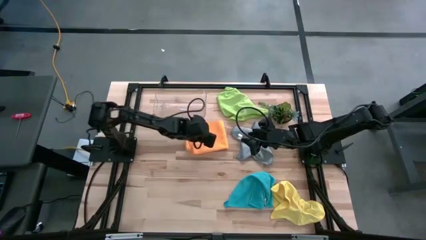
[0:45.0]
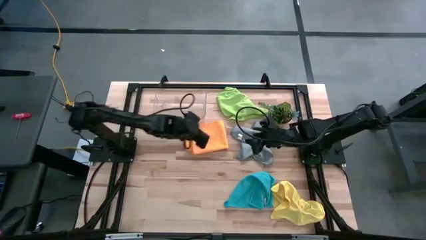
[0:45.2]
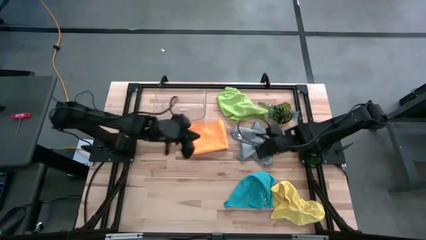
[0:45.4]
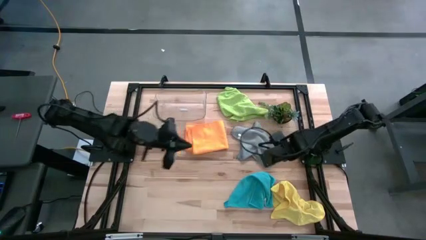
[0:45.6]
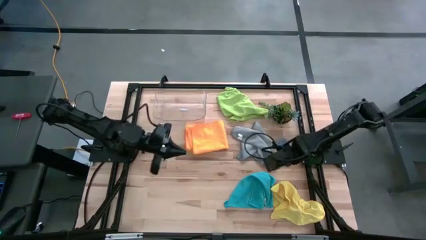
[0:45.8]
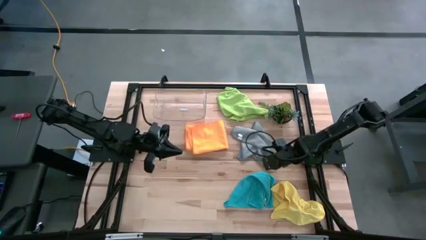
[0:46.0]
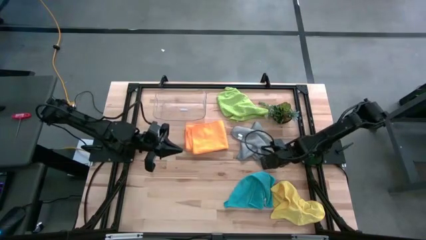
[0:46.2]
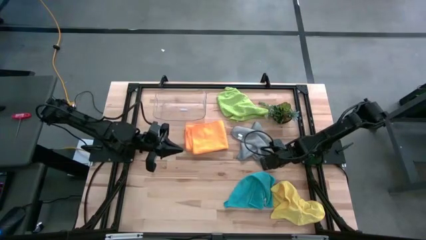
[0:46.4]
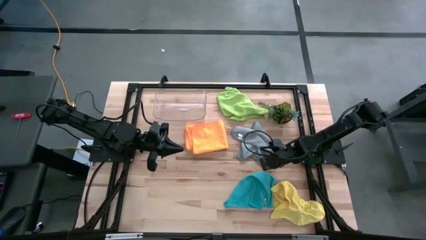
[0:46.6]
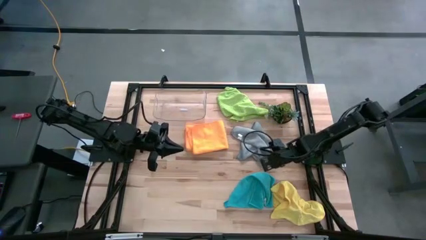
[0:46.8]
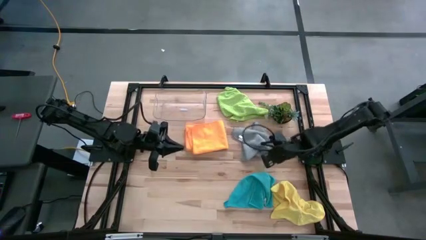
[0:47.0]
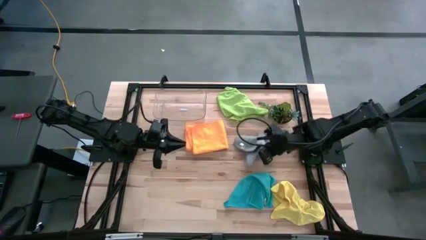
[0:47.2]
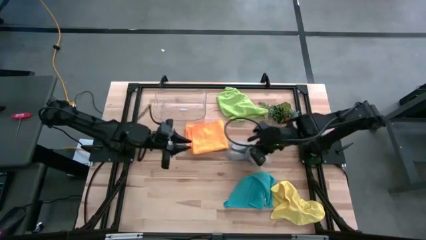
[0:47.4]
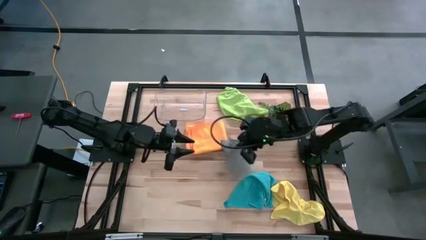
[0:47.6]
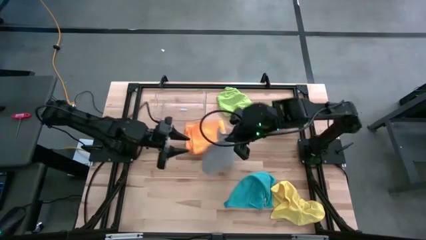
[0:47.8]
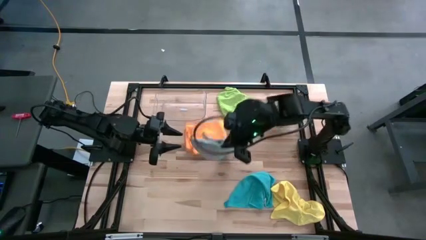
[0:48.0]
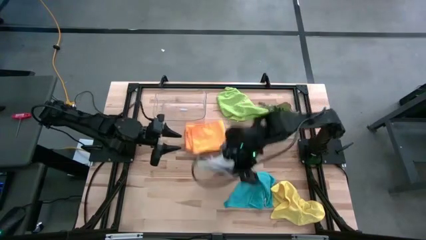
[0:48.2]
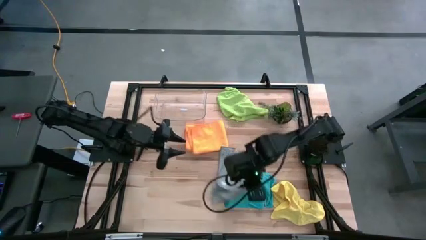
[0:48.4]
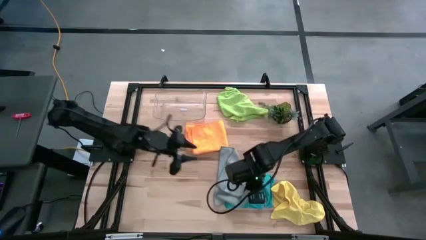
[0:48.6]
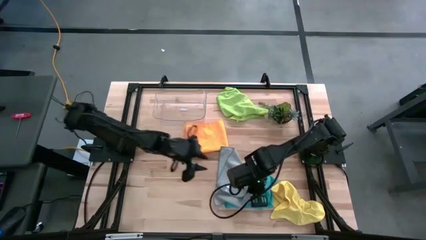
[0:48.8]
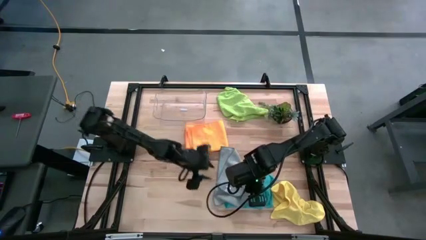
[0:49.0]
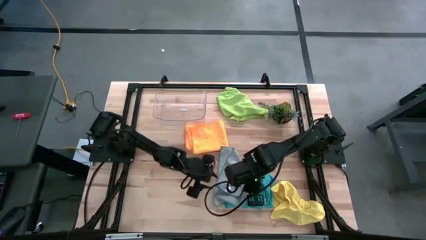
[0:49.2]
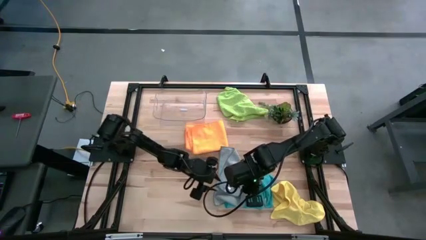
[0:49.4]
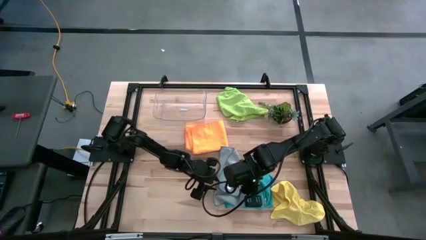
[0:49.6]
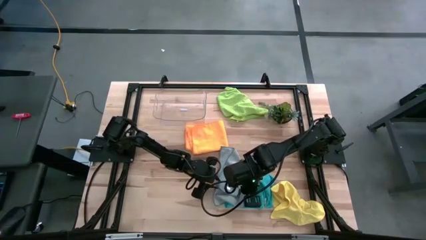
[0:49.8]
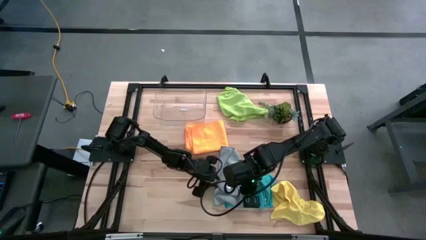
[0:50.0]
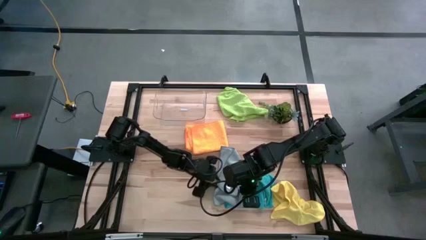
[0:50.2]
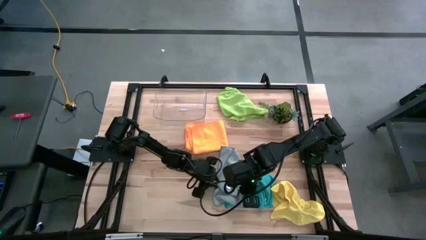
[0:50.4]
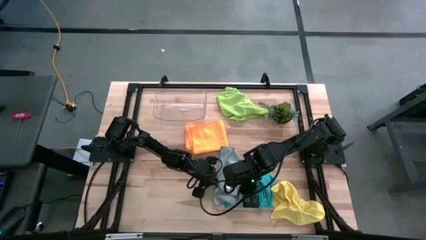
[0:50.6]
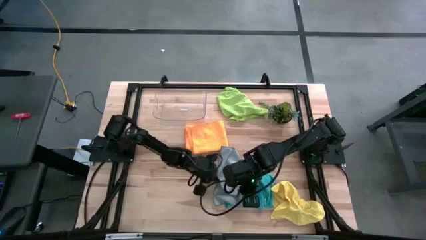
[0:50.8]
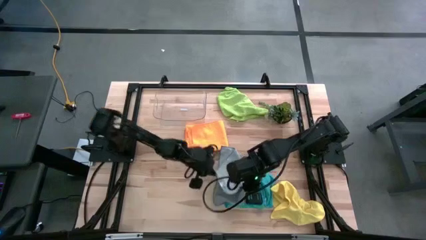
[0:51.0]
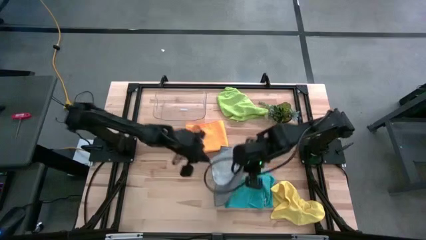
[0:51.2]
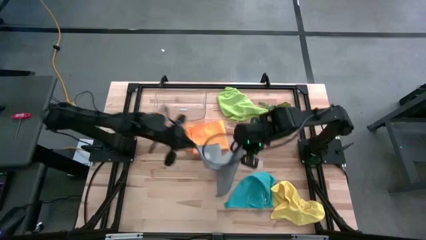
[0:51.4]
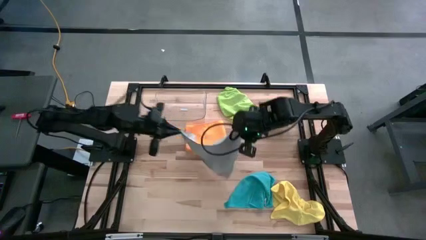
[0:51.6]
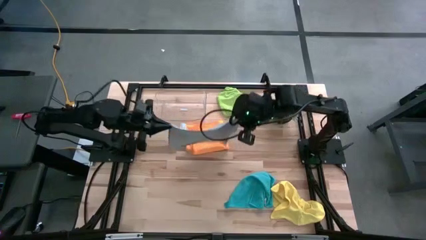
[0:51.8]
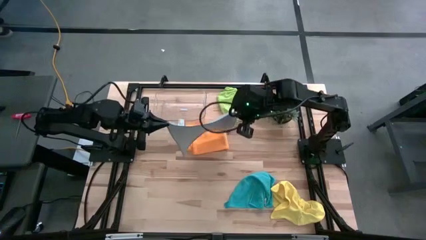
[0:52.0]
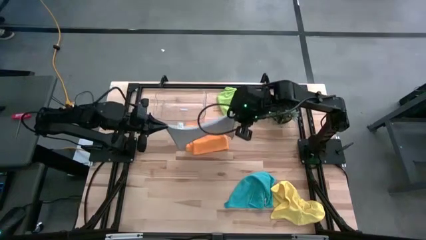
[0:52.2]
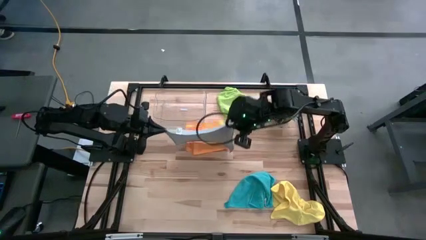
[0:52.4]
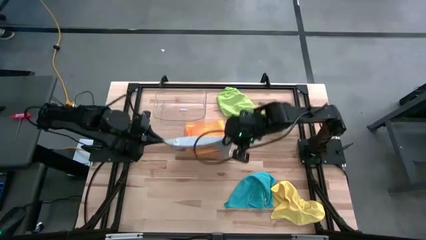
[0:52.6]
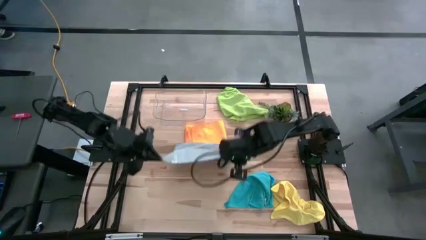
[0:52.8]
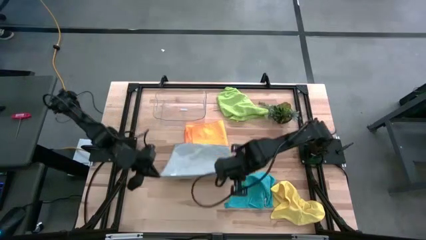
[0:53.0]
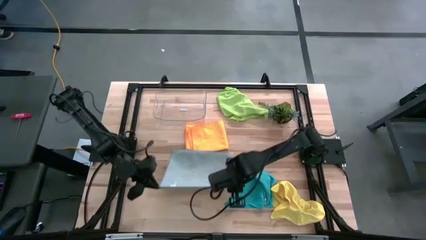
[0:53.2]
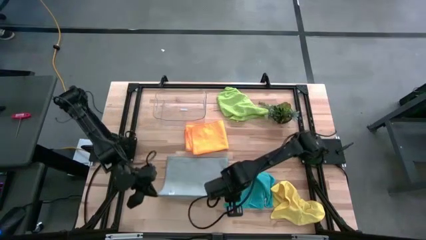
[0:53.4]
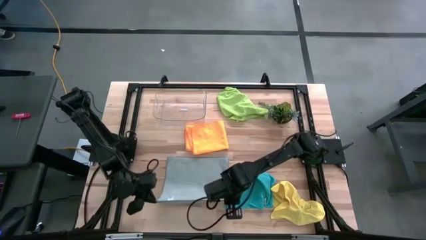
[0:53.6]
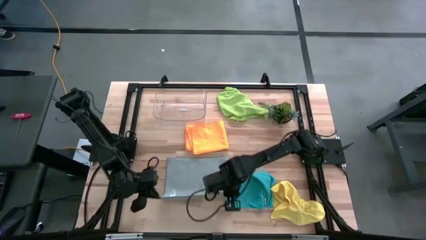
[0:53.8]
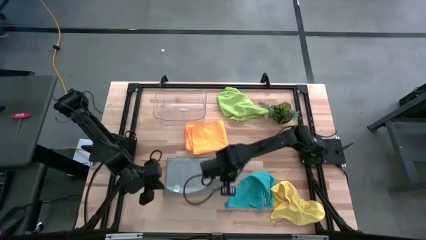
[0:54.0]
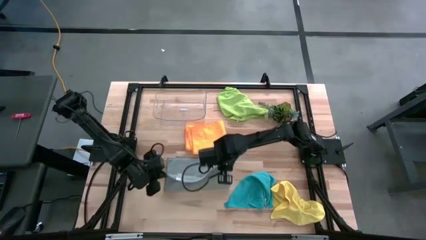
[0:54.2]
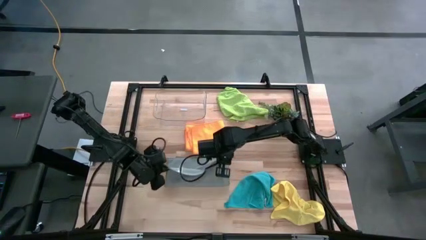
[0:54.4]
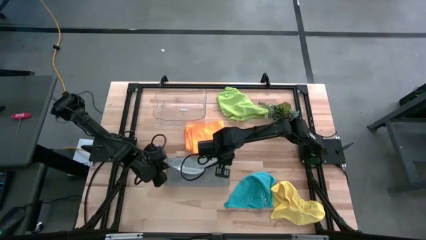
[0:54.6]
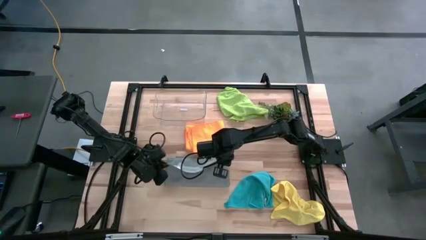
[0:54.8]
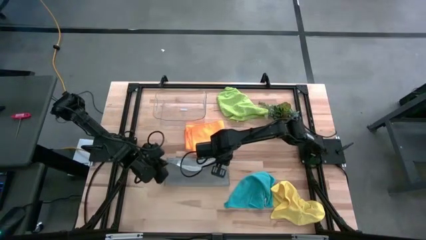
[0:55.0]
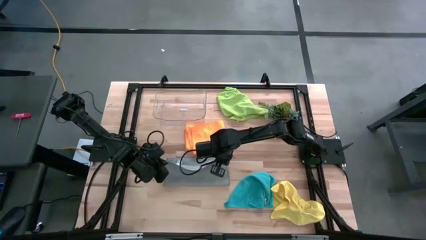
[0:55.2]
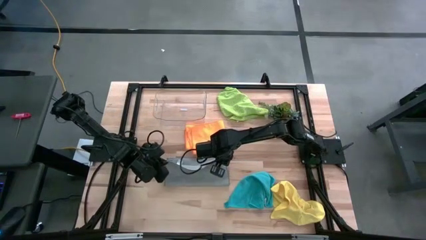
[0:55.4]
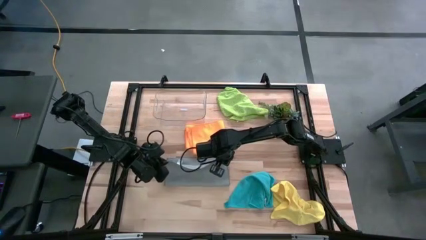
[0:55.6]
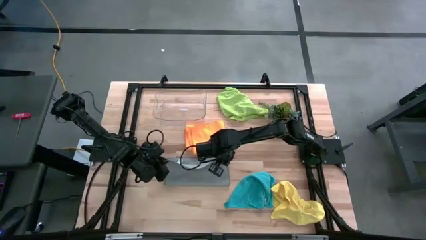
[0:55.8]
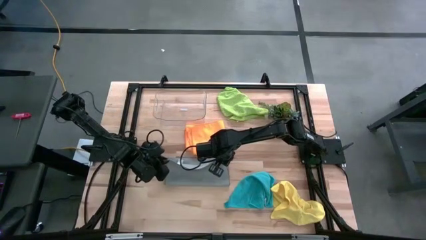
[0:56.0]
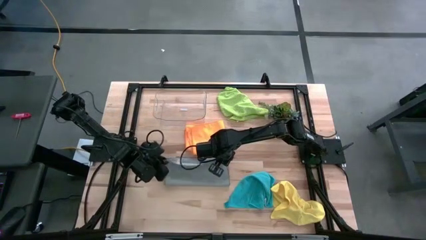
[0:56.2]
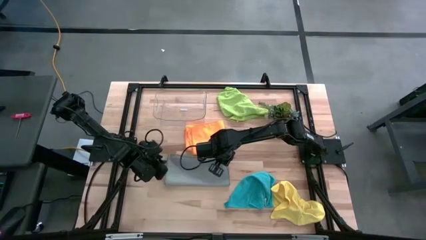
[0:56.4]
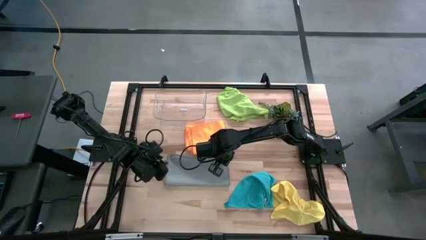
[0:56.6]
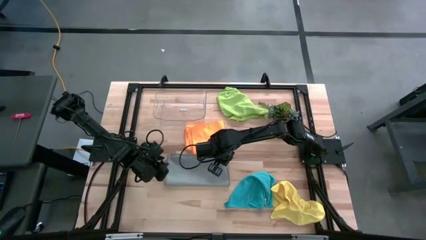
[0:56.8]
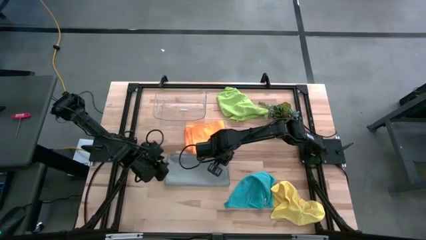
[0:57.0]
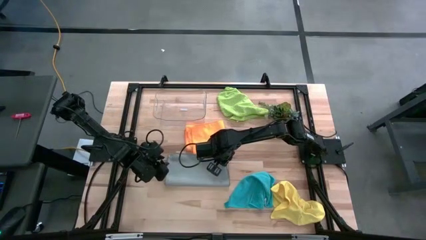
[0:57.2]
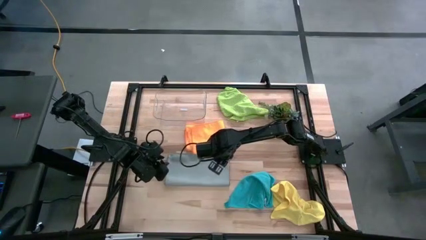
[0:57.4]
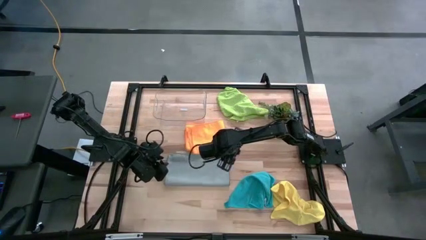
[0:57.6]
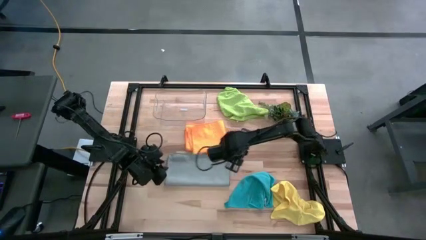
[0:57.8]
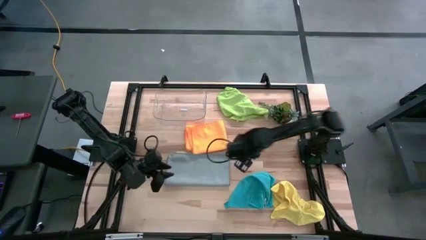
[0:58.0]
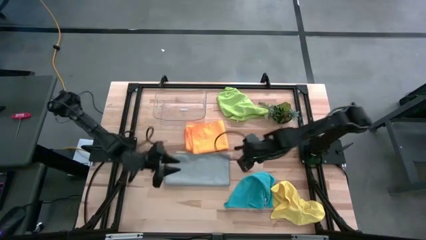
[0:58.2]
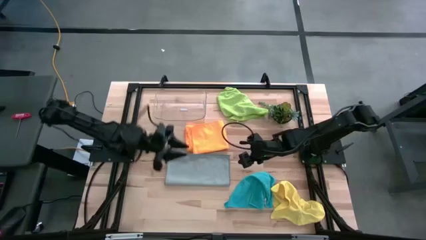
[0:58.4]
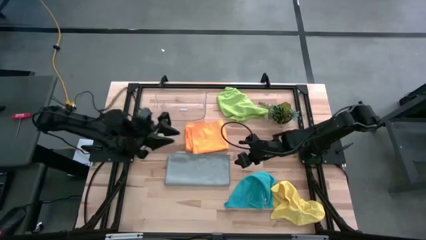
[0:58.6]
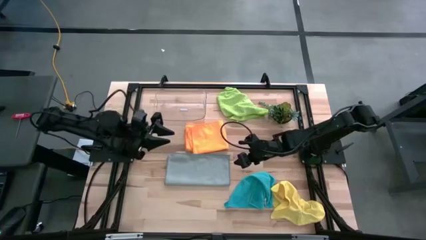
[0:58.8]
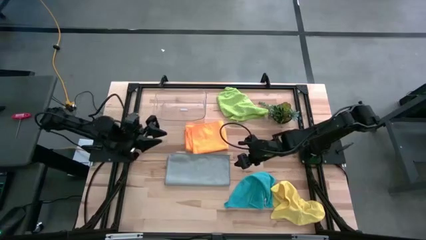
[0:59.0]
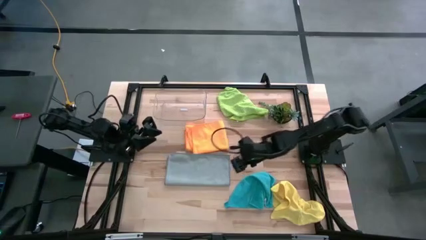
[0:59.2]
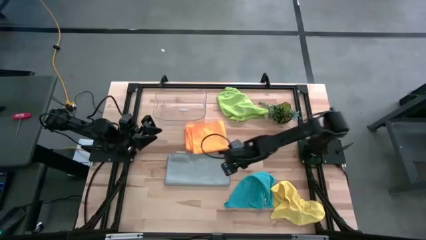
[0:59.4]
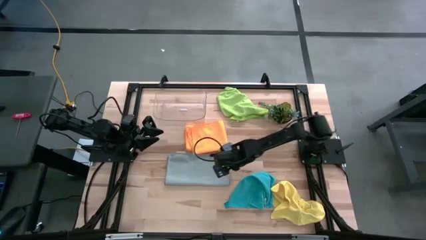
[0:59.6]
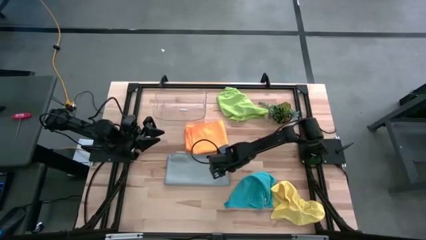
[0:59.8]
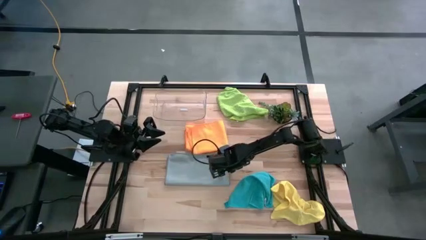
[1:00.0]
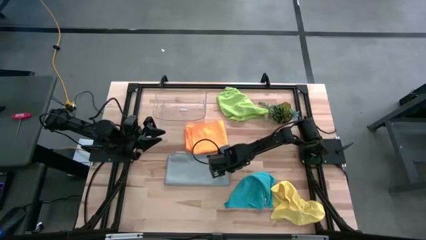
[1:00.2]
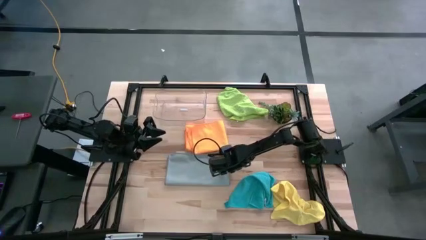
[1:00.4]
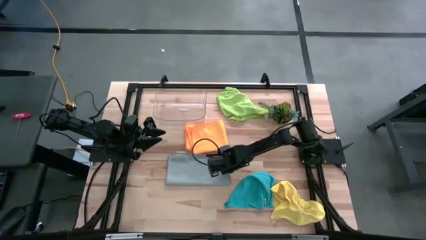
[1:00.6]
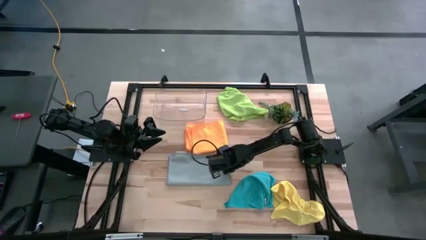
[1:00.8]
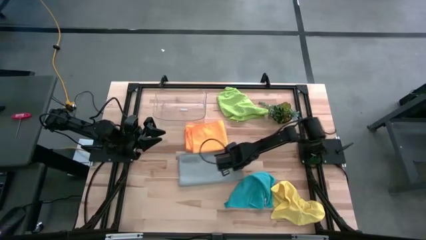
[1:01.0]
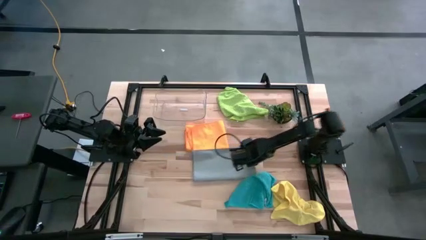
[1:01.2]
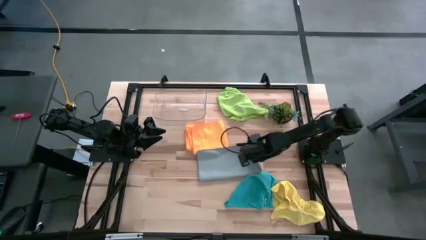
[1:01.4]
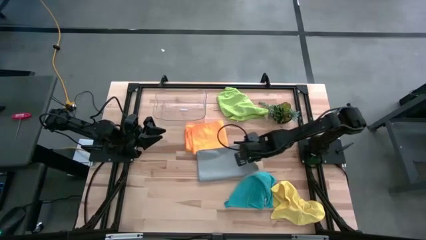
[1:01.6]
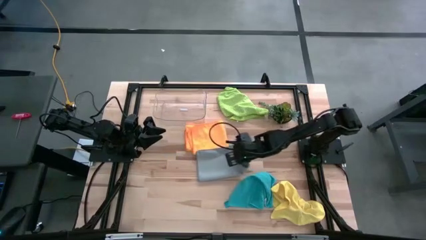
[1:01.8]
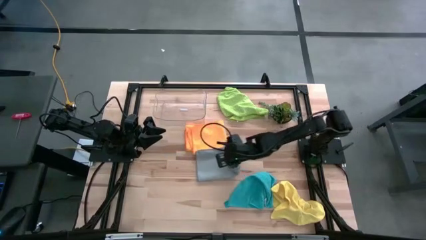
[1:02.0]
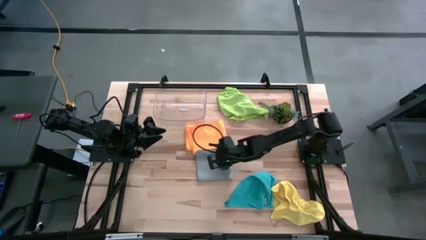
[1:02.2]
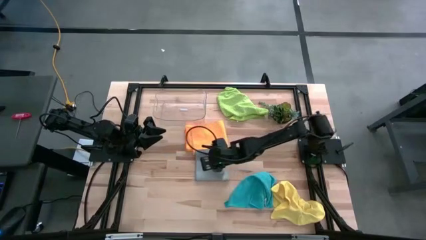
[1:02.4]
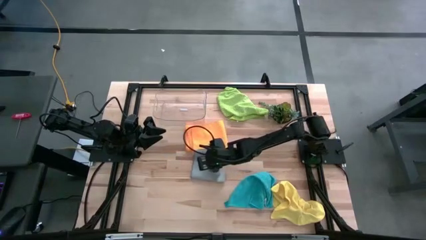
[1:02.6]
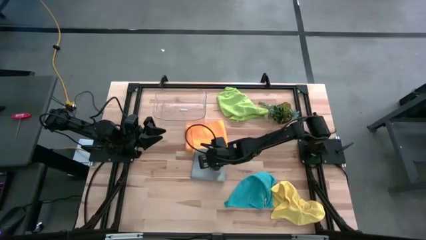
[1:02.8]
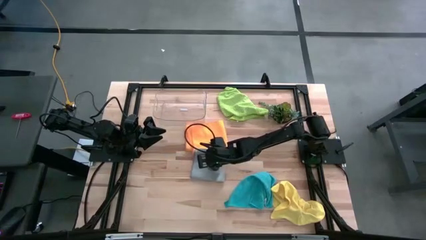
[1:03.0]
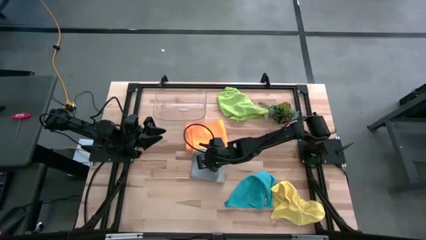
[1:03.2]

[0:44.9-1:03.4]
Task: Fold microfiber towels
Fold the gray towel
